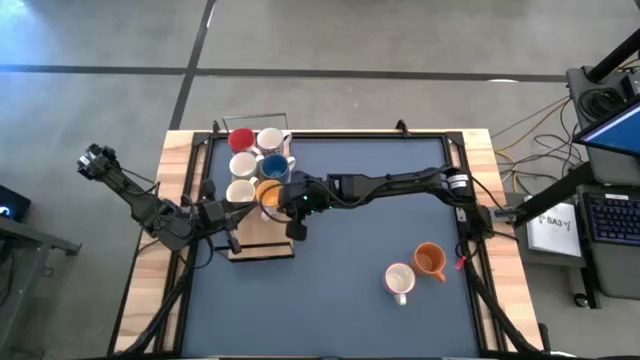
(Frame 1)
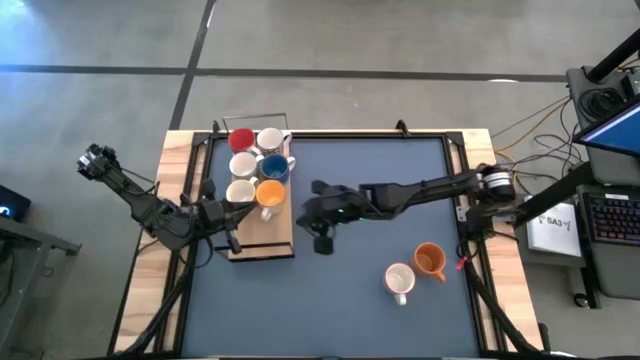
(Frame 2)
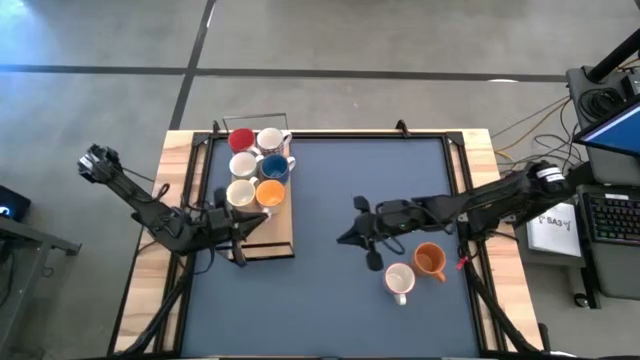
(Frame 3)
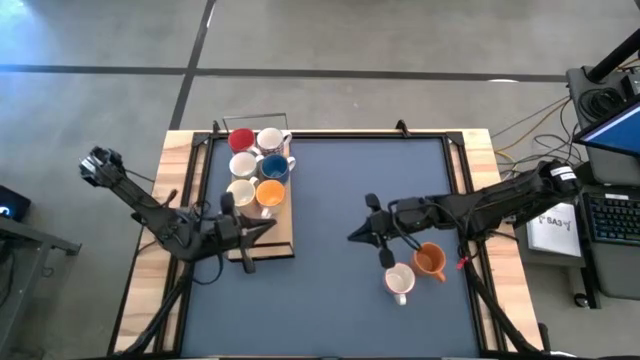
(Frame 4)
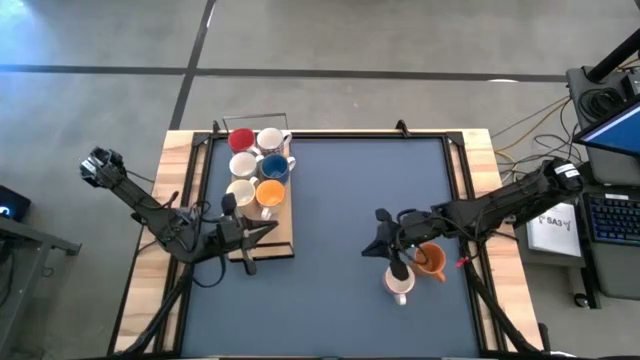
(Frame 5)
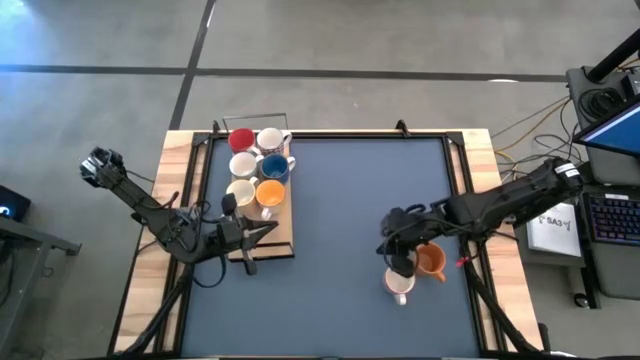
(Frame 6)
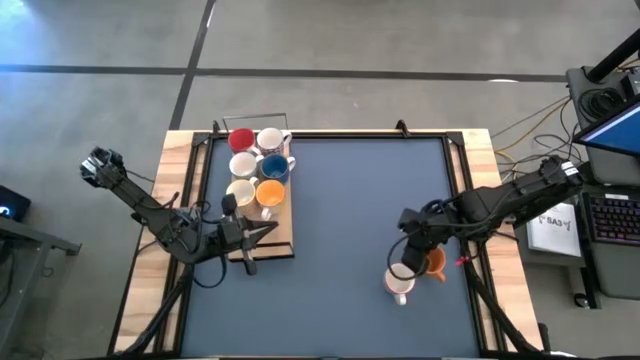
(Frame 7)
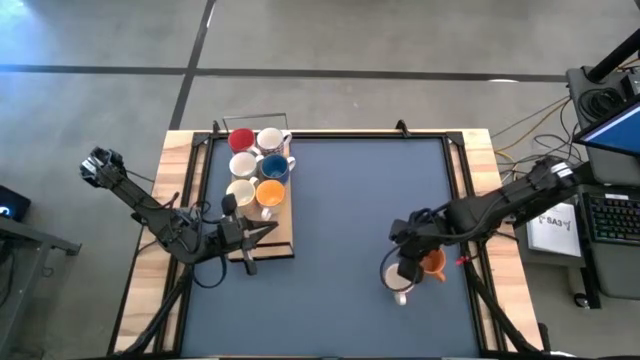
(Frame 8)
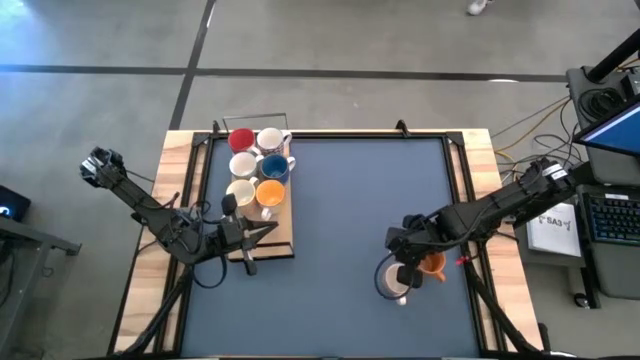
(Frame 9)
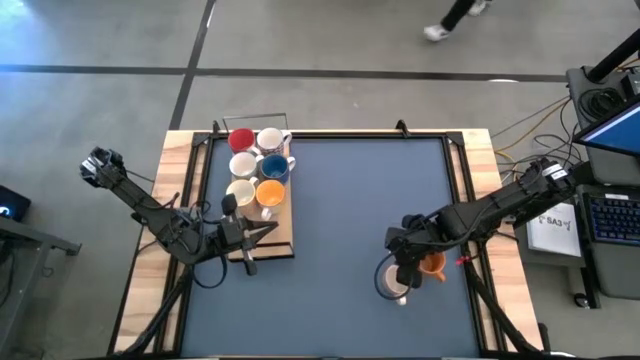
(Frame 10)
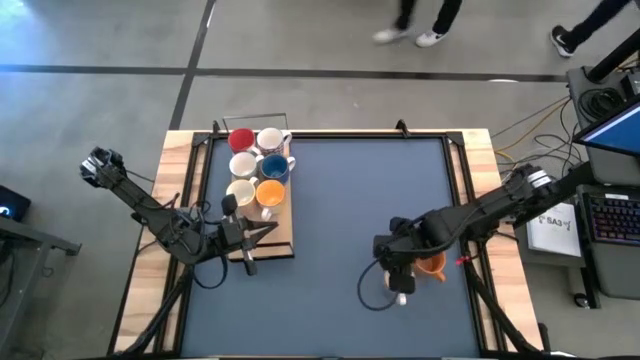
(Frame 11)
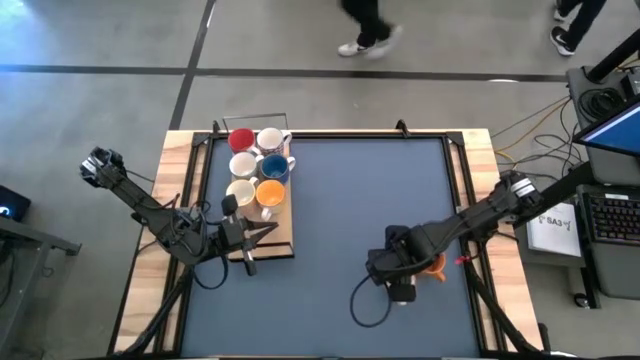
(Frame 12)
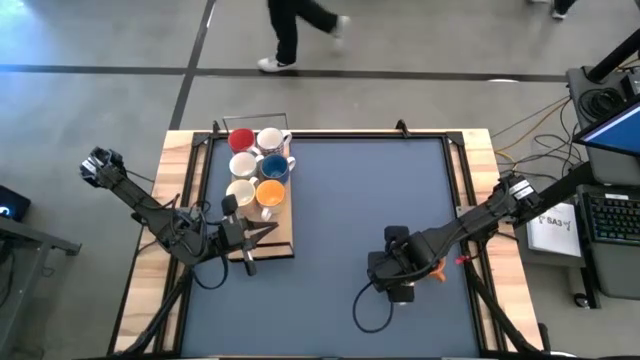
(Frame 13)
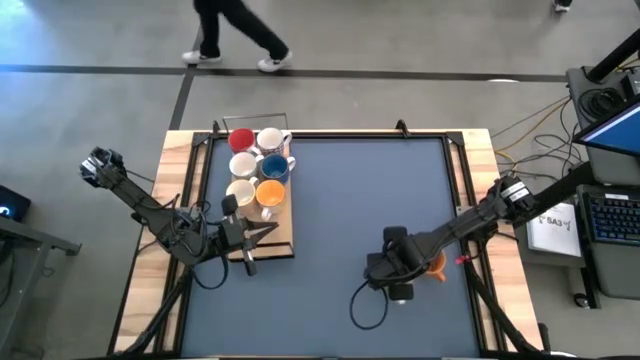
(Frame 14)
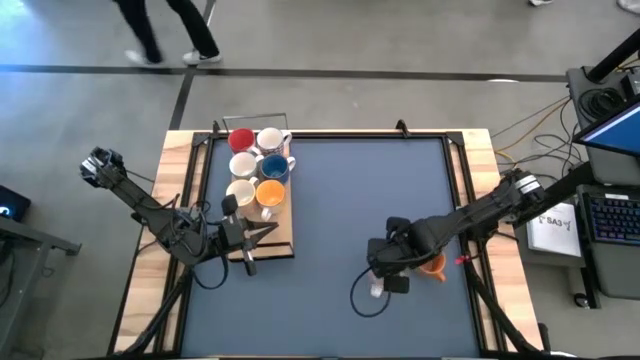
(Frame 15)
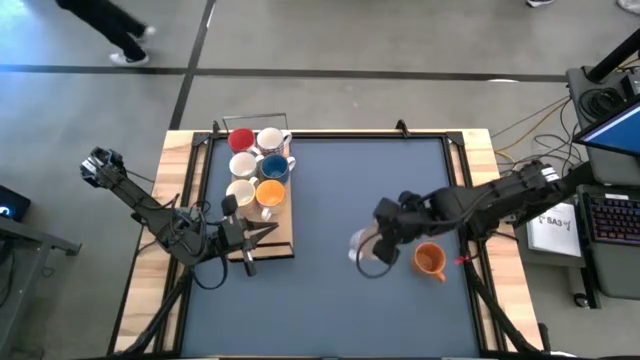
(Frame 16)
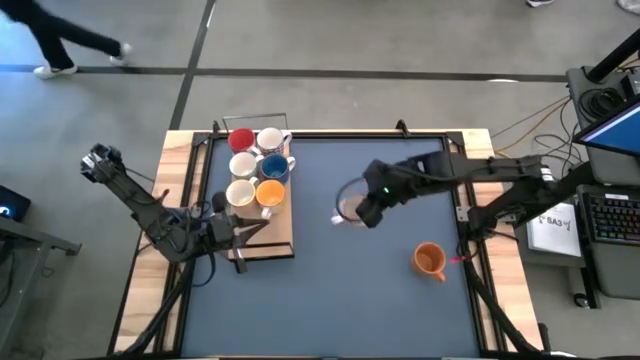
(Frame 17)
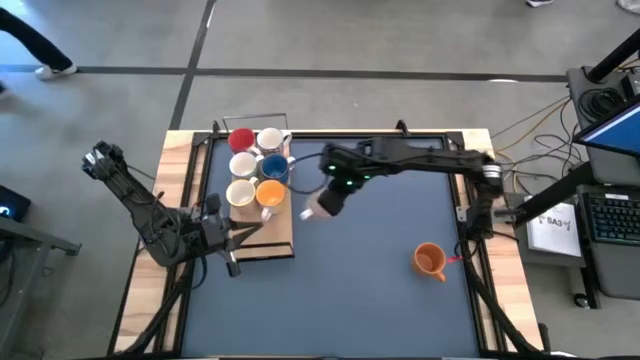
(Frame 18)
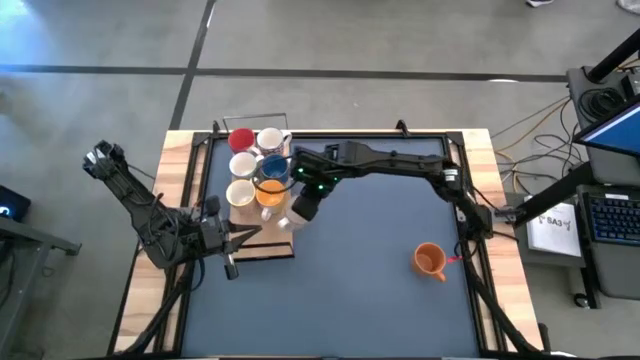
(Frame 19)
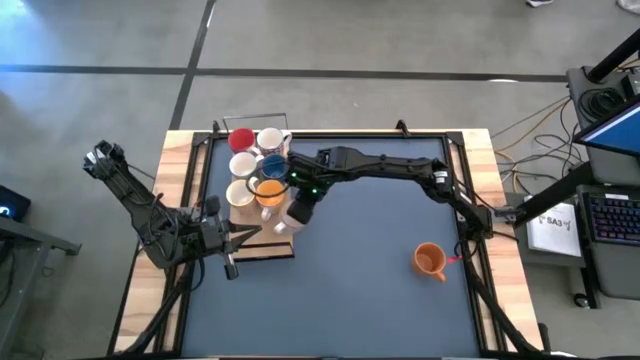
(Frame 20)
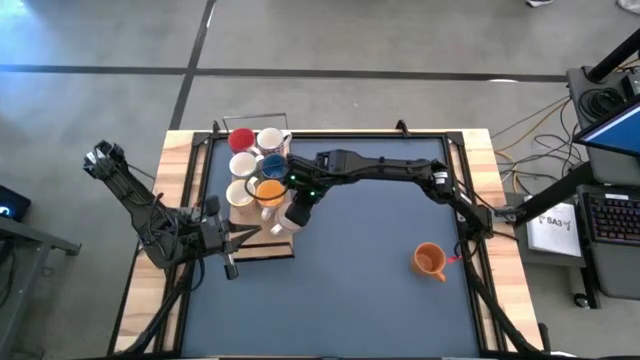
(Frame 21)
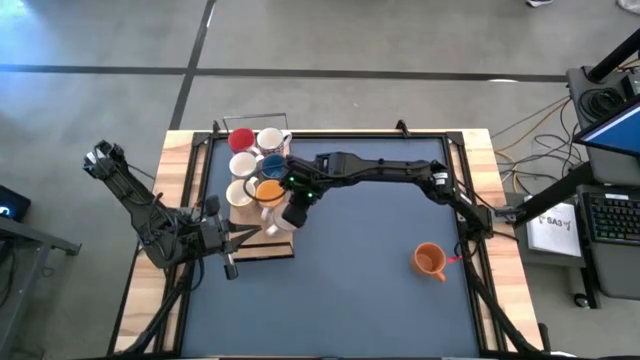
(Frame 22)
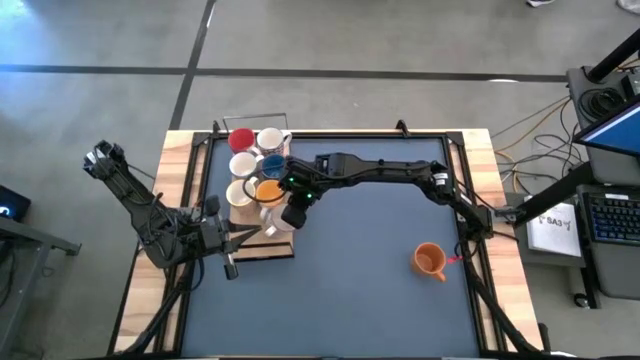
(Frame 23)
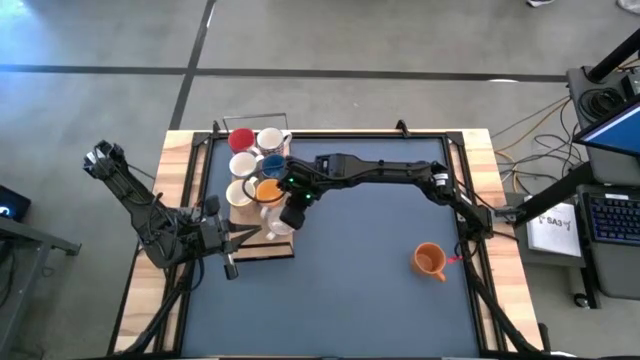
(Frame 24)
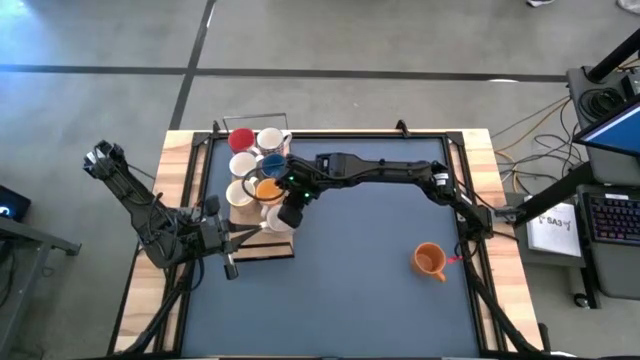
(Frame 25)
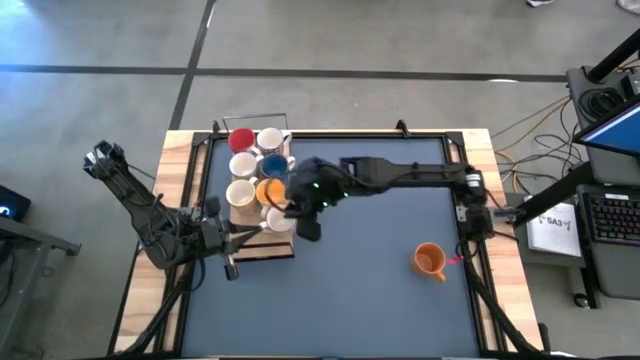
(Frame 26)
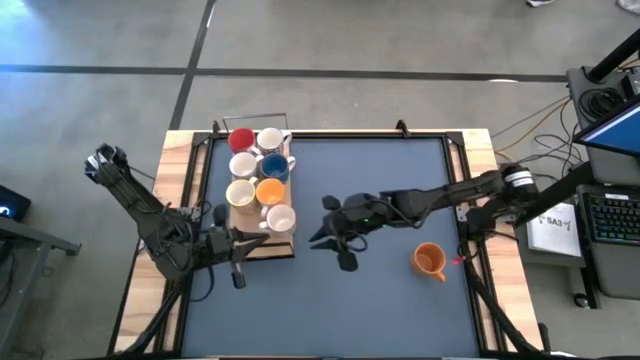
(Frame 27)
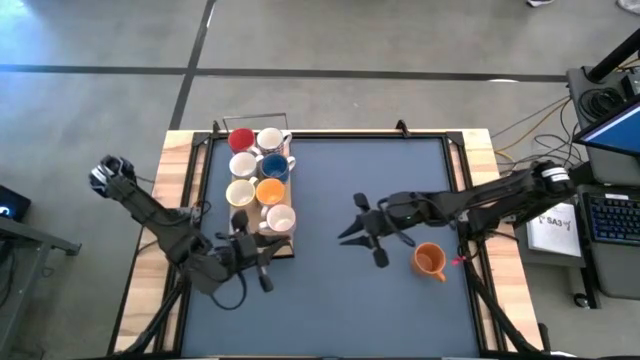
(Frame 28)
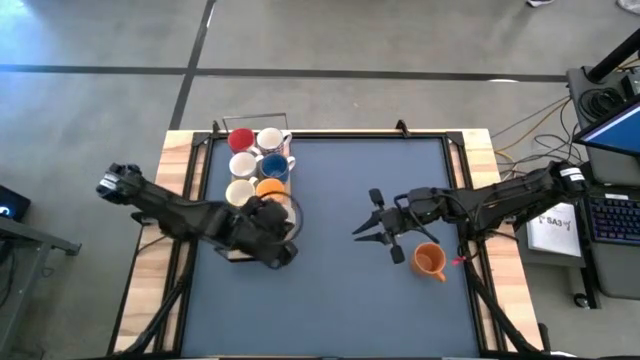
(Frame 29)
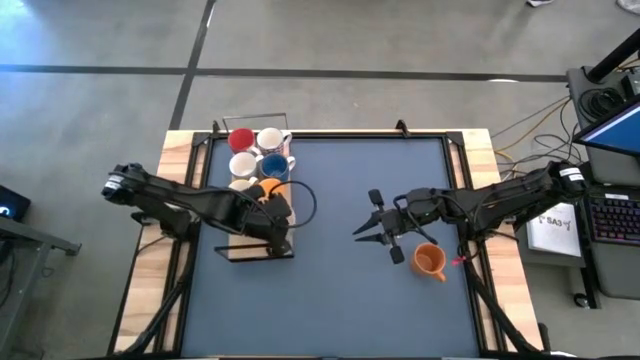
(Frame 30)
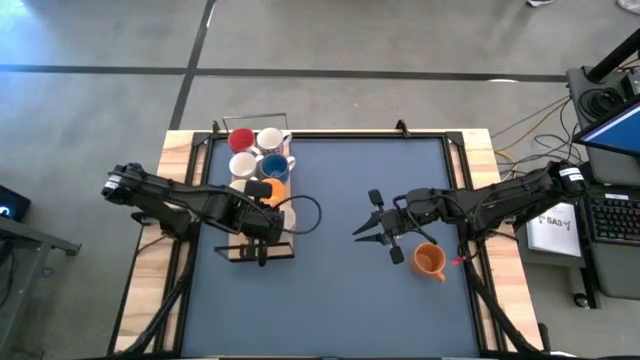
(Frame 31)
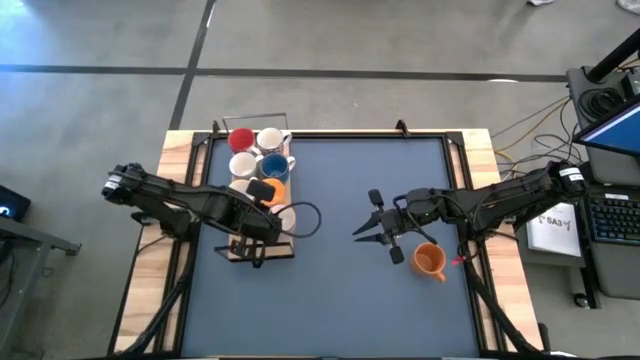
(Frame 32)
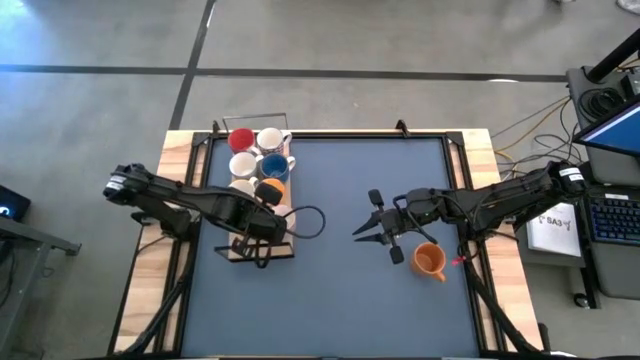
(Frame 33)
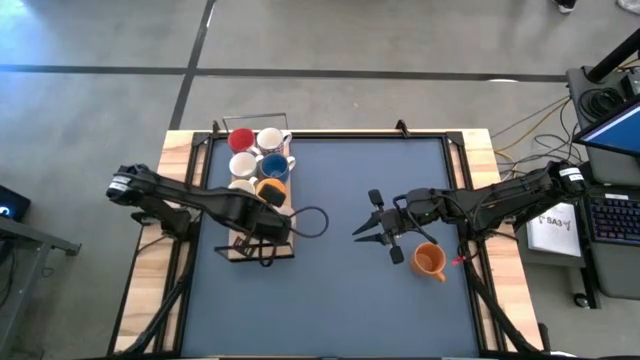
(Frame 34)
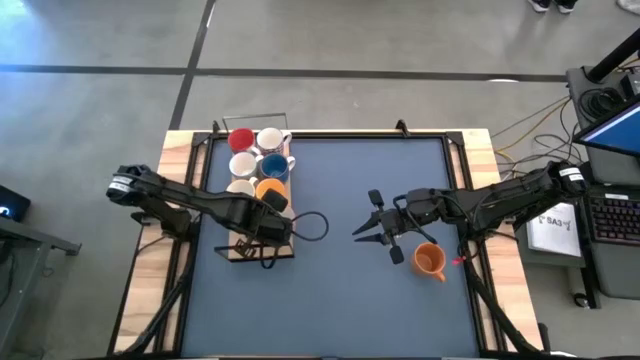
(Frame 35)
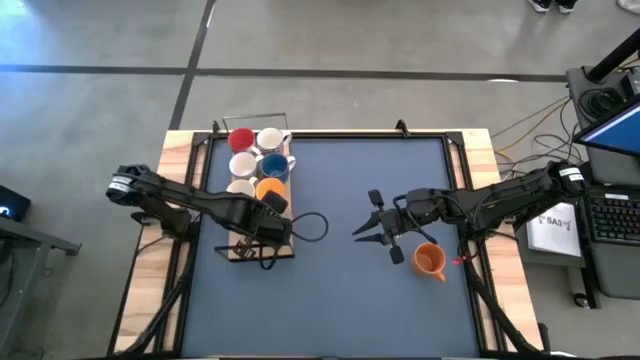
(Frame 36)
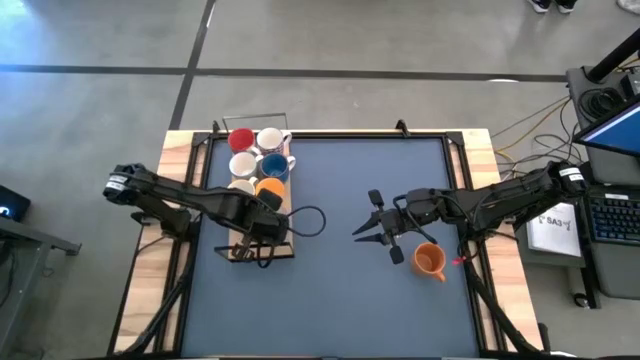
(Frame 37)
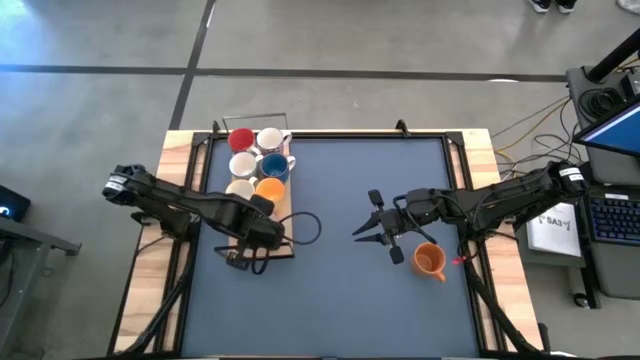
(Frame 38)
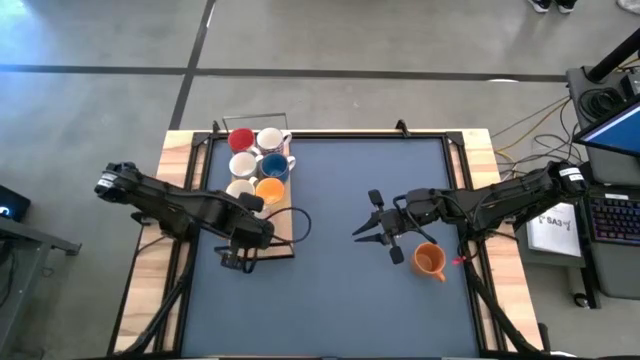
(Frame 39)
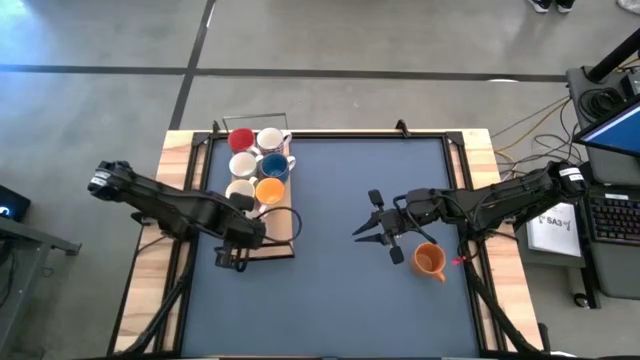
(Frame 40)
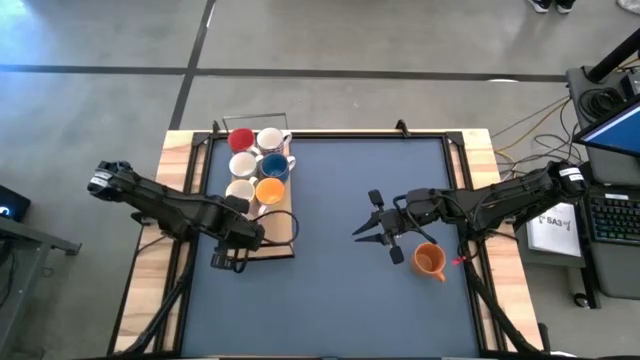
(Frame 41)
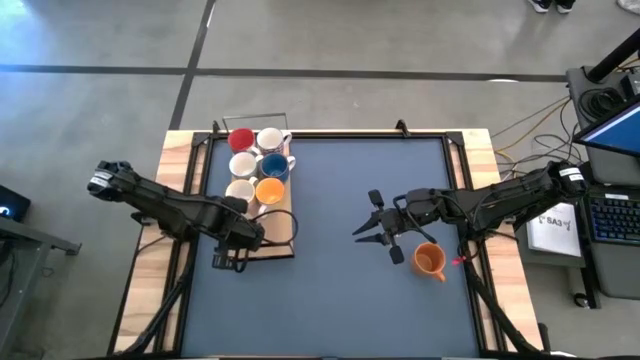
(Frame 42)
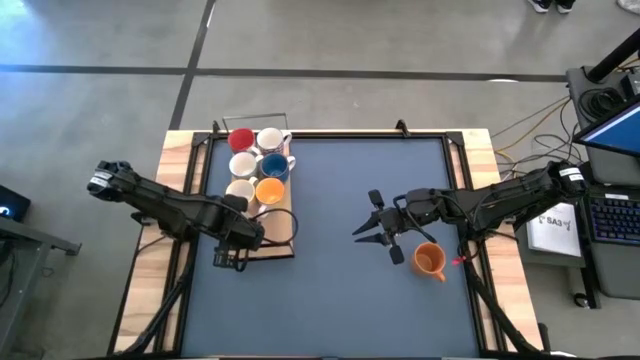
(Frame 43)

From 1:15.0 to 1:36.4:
Task: Place coffee mugs
Put the gray patterned mug on the shelf
